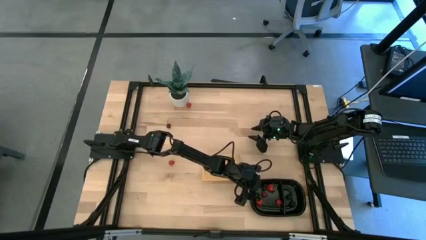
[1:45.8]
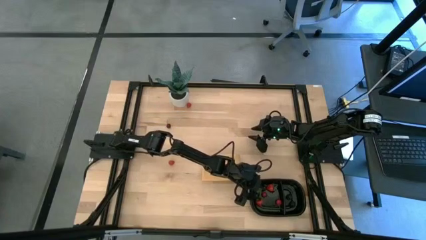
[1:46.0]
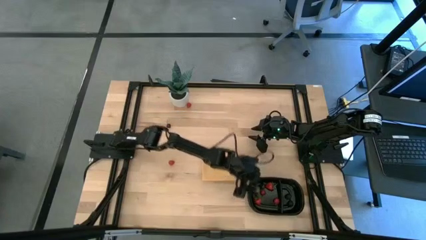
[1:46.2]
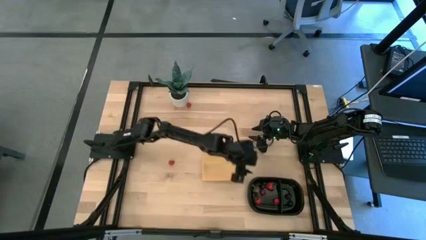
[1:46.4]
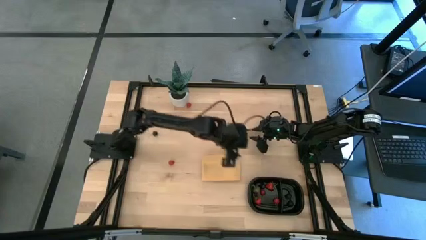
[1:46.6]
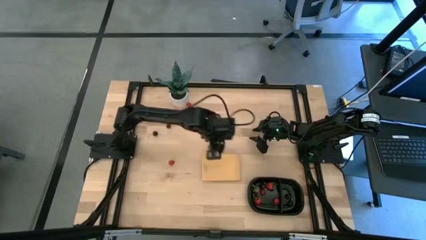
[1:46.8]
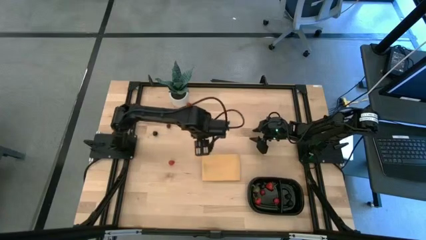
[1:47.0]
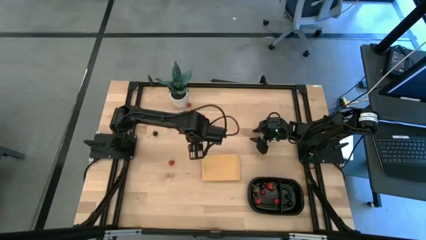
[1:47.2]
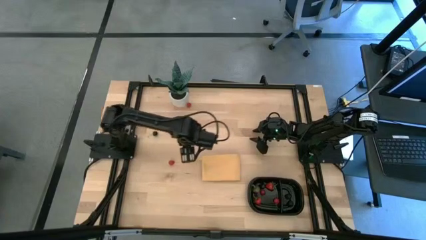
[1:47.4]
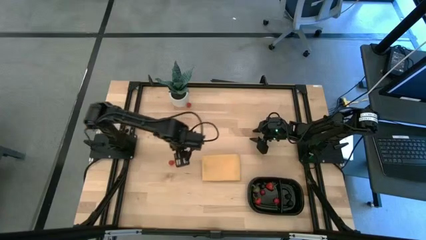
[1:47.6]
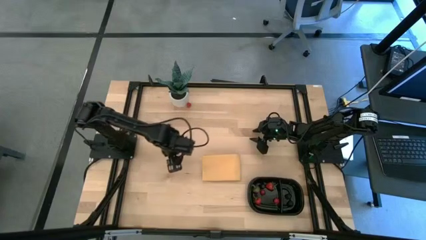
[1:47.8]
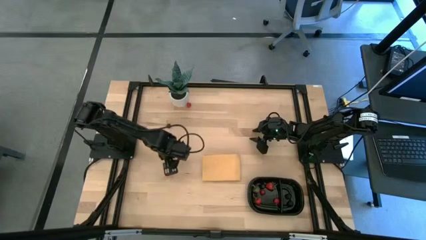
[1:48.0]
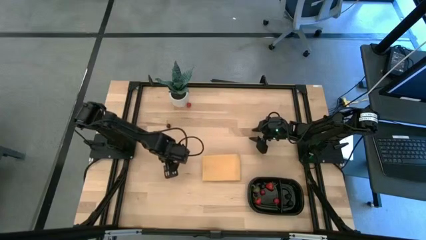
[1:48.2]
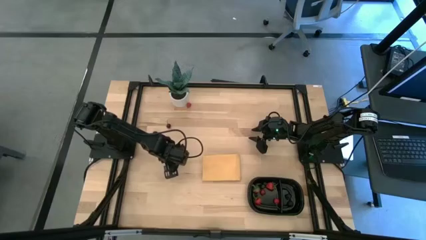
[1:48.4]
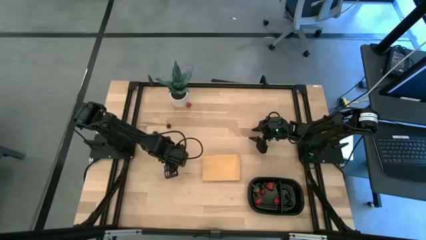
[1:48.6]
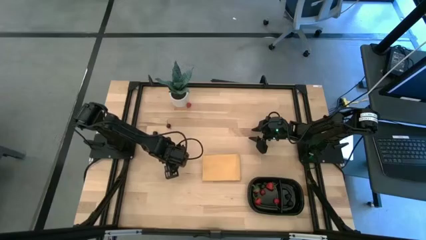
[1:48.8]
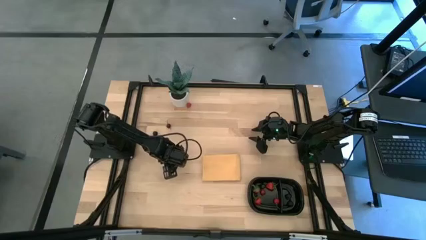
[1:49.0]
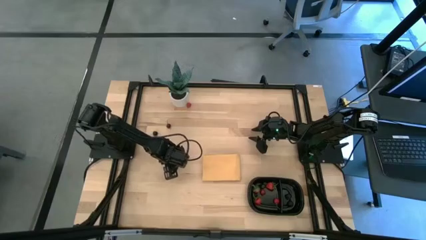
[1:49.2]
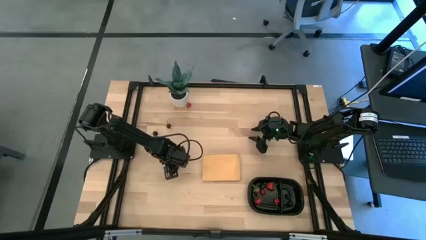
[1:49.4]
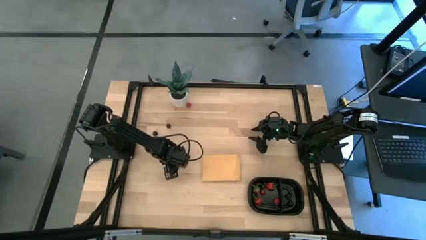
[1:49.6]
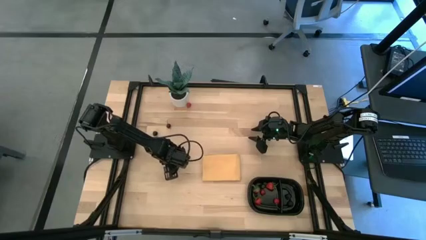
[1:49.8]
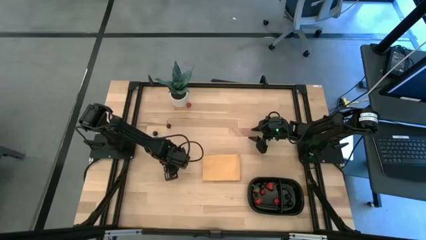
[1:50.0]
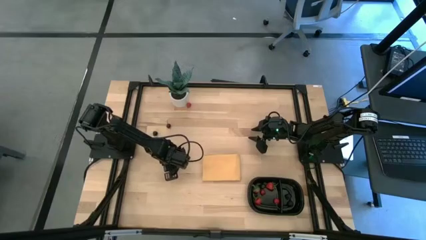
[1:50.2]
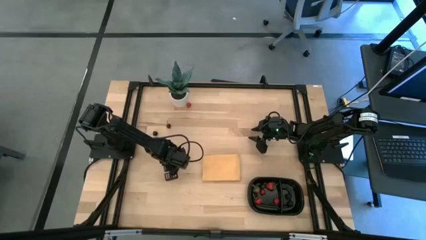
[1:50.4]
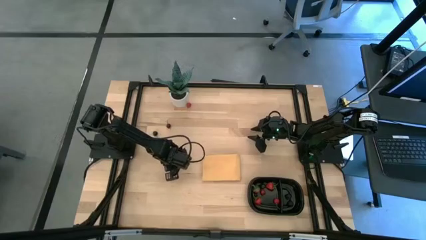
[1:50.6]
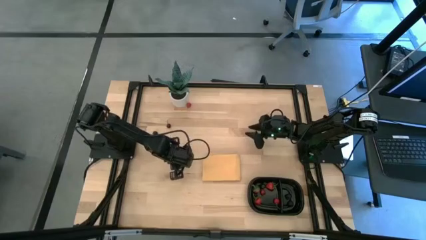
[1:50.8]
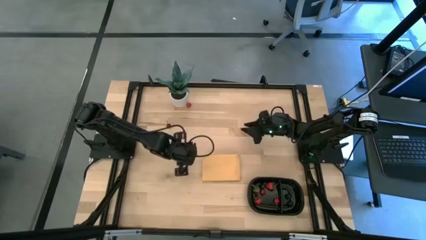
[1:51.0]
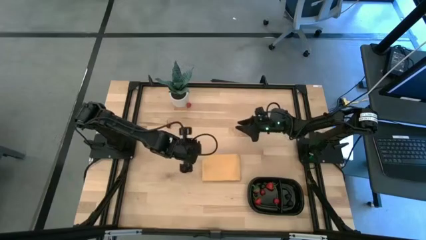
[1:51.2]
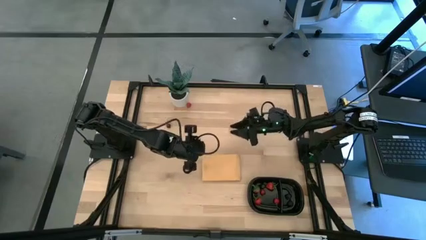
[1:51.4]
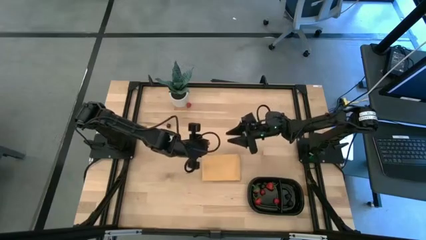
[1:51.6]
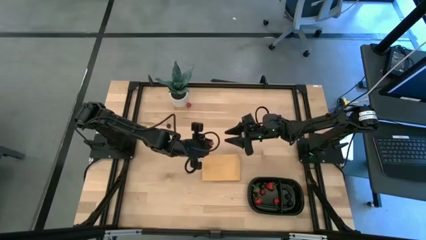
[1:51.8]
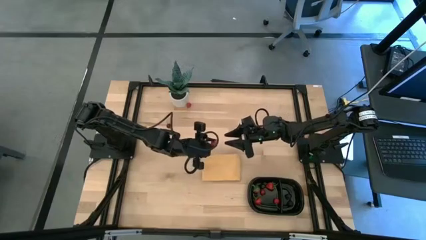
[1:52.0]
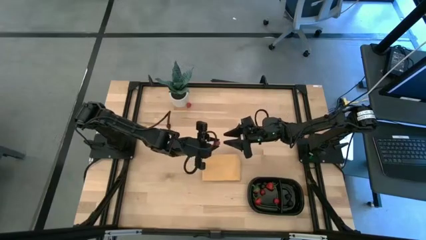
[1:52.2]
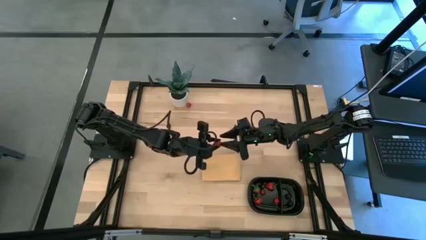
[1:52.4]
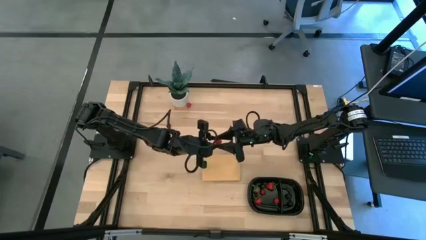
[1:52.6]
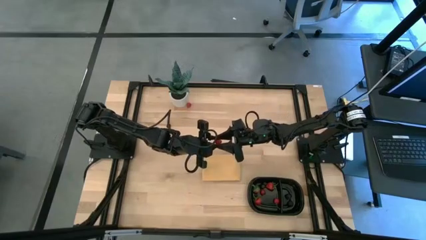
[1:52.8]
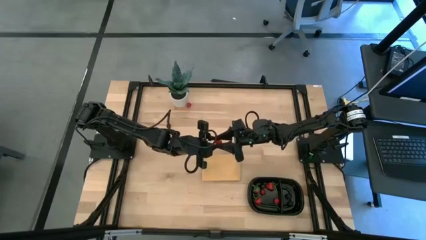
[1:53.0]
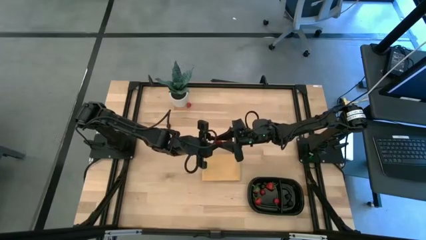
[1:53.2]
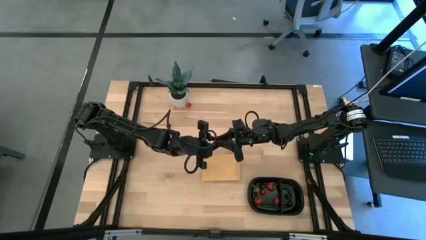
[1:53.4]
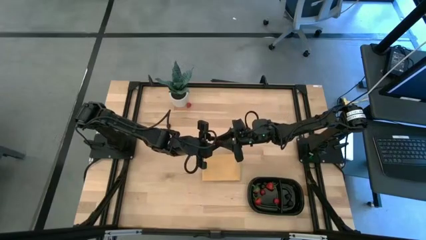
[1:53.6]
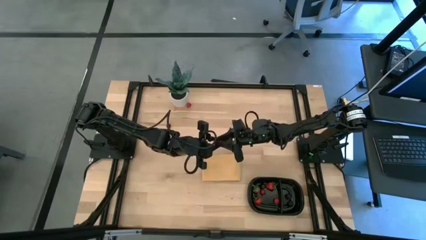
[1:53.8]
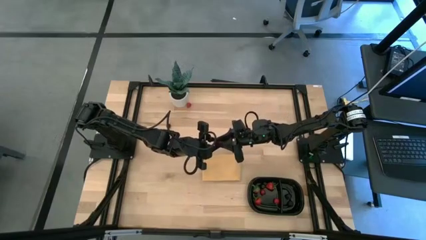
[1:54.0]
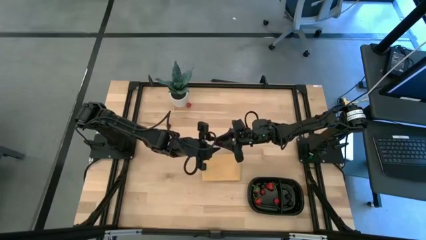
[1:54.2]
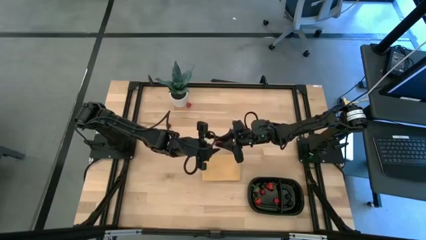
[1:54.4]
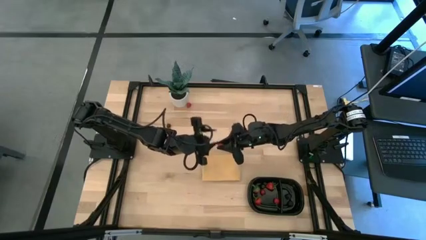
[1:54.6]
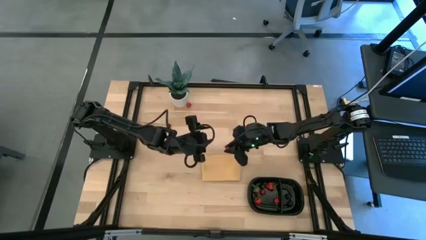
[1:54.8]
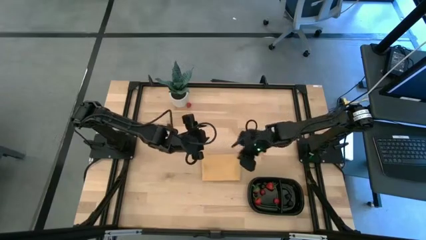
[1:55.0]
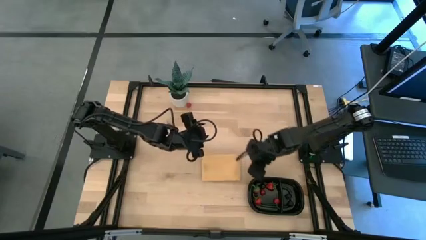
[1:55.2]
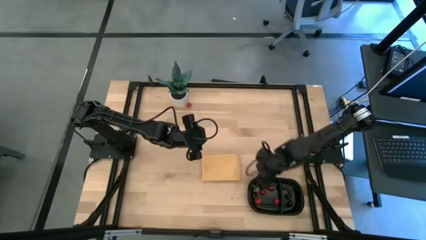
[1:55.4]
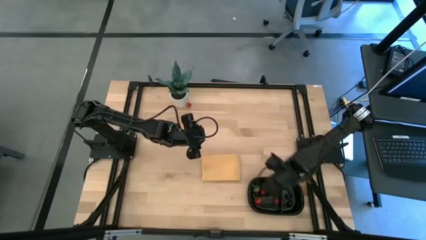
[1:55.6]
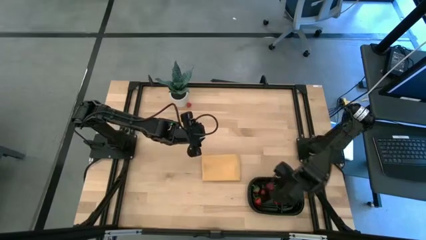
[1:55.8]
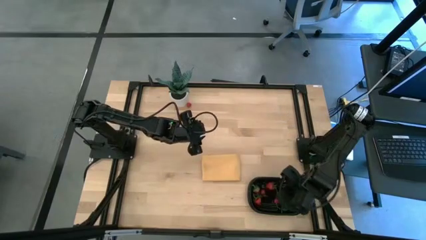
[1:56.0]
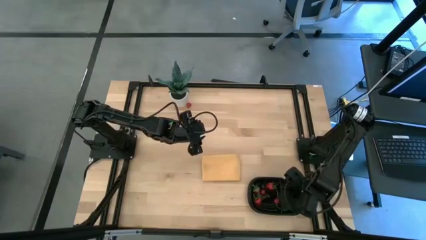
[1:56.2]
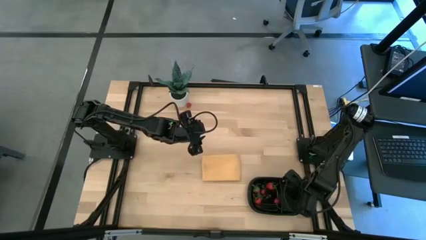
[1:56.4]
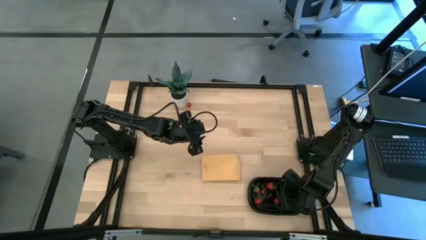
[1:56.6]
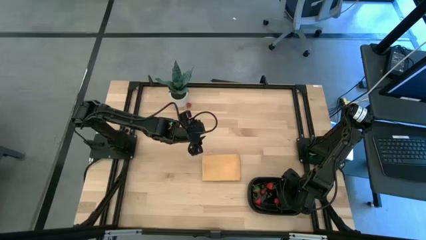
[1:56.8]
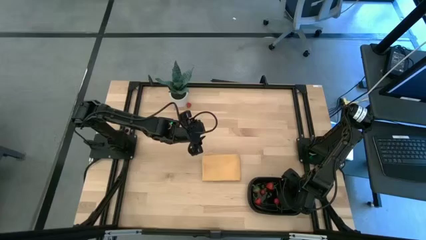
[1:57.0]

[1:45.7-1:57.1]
Task: Pick and placing Produce into tupperware
Put the red raspberry into the black container
